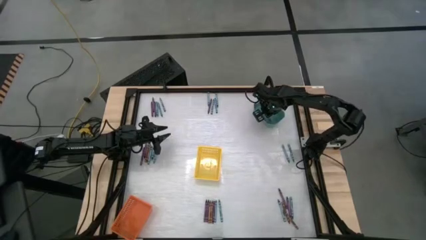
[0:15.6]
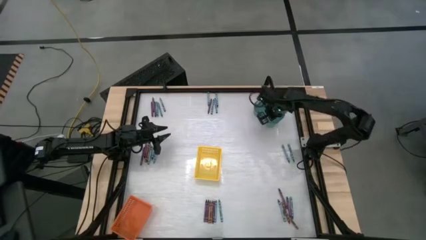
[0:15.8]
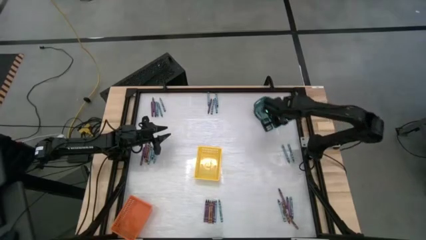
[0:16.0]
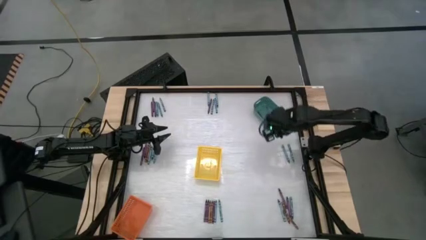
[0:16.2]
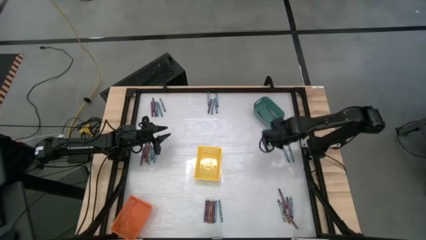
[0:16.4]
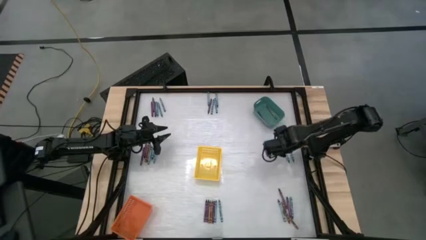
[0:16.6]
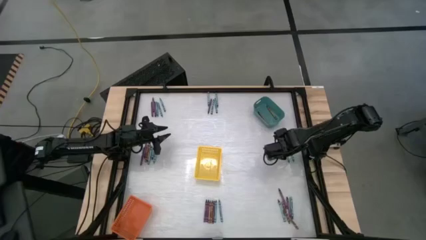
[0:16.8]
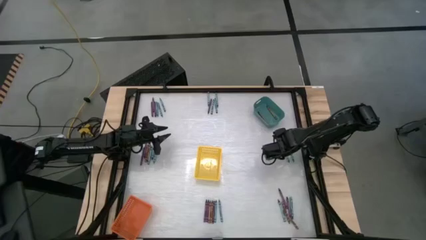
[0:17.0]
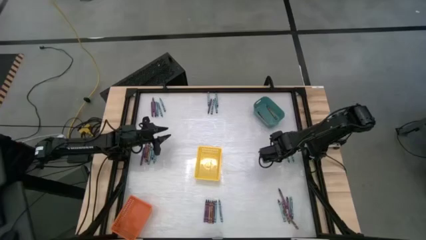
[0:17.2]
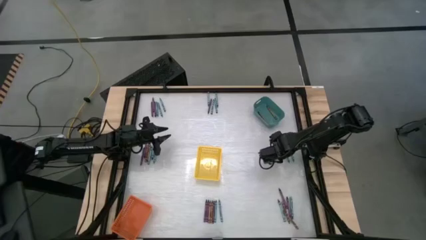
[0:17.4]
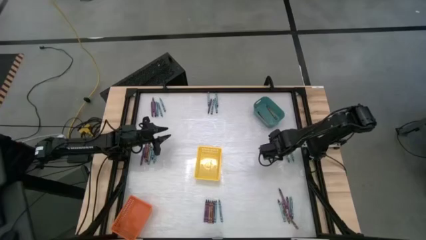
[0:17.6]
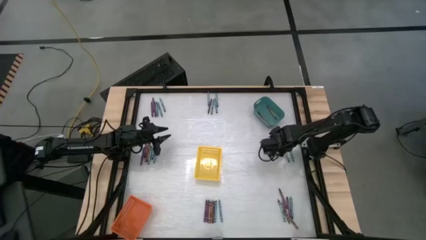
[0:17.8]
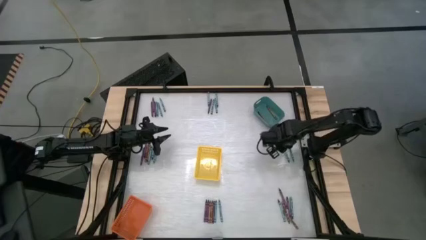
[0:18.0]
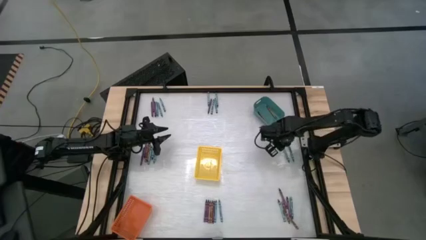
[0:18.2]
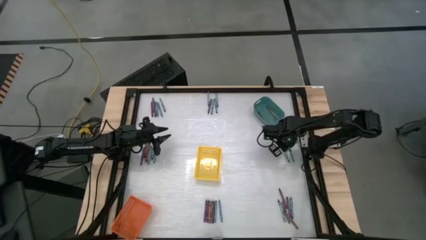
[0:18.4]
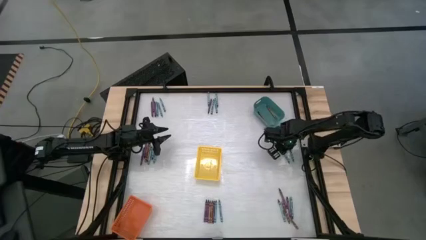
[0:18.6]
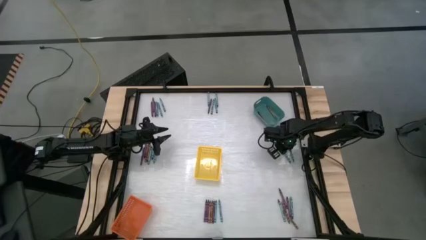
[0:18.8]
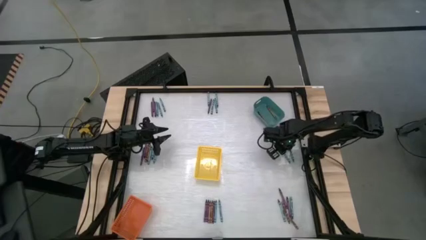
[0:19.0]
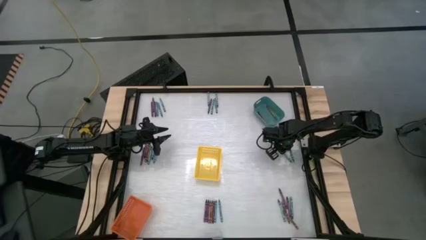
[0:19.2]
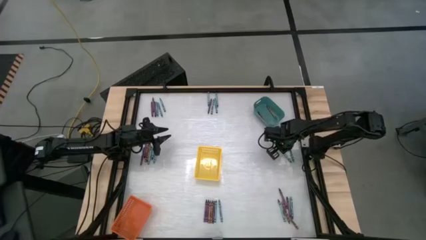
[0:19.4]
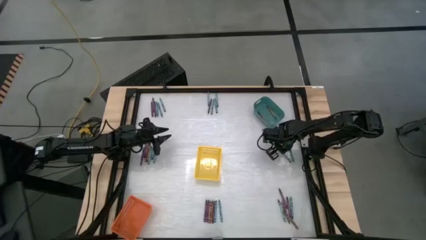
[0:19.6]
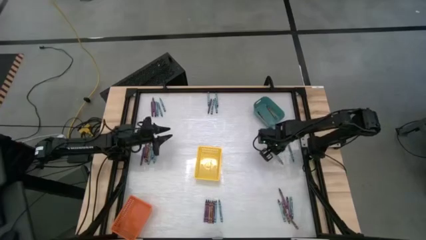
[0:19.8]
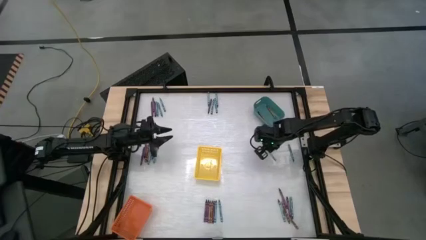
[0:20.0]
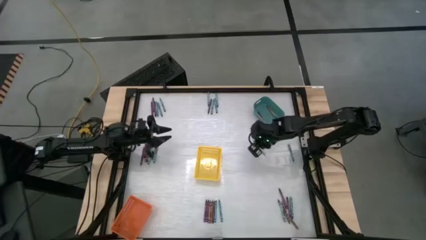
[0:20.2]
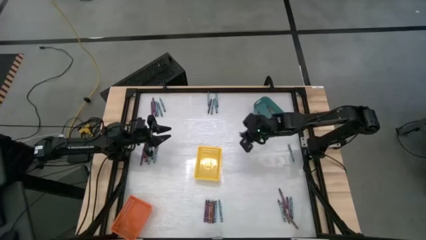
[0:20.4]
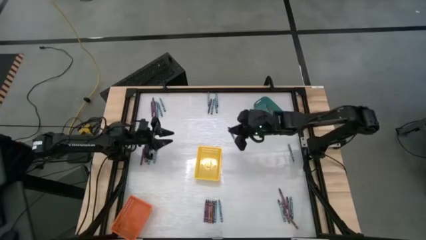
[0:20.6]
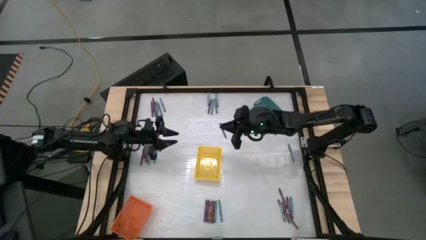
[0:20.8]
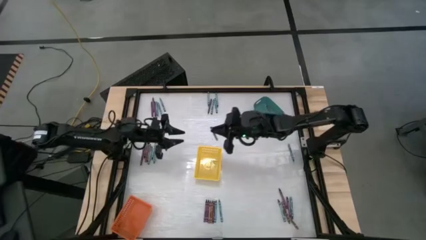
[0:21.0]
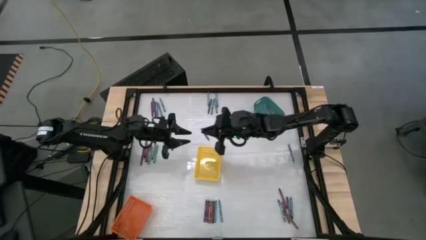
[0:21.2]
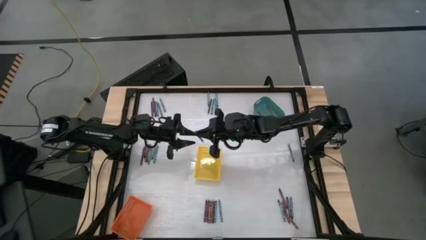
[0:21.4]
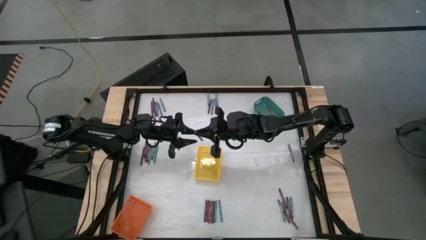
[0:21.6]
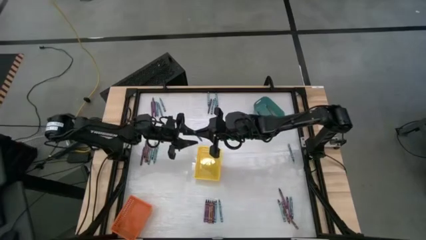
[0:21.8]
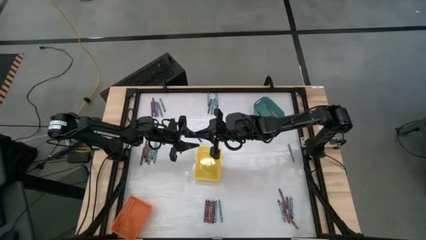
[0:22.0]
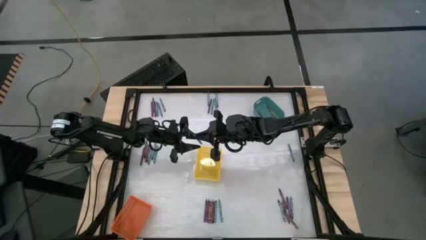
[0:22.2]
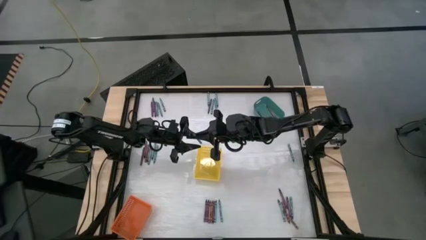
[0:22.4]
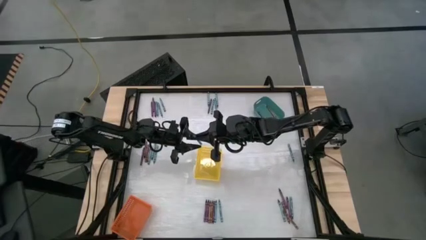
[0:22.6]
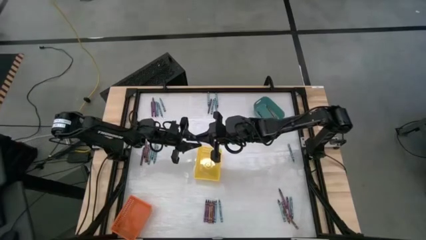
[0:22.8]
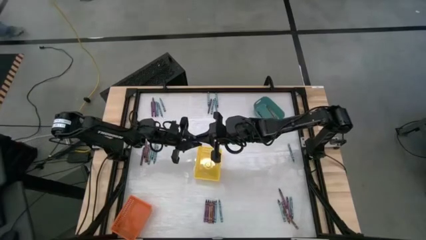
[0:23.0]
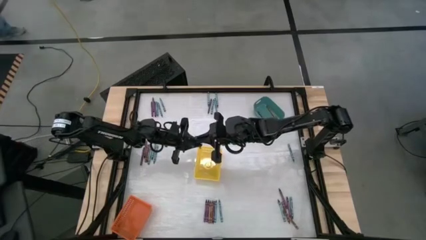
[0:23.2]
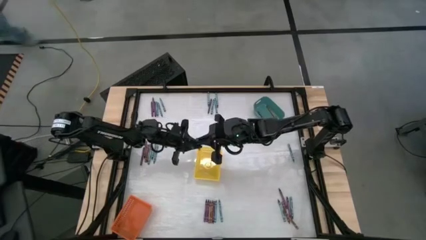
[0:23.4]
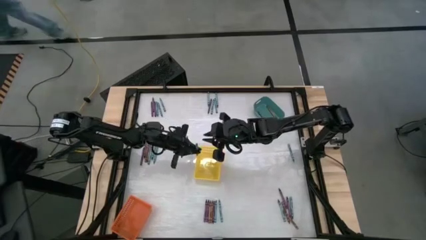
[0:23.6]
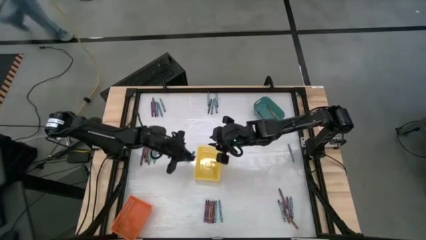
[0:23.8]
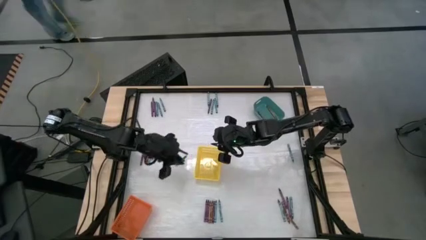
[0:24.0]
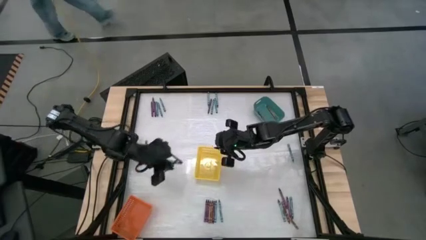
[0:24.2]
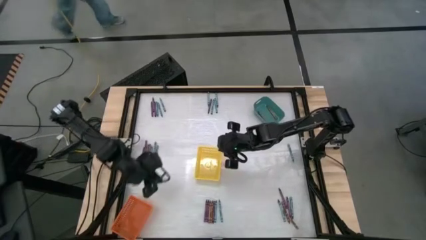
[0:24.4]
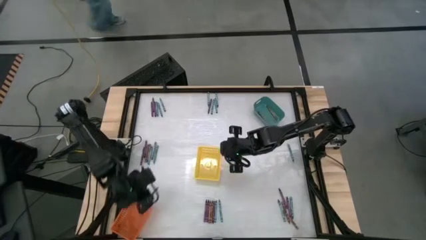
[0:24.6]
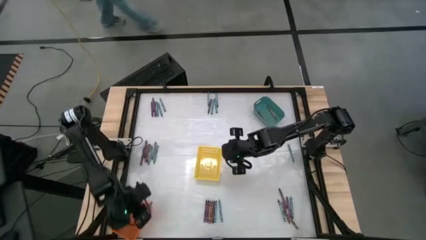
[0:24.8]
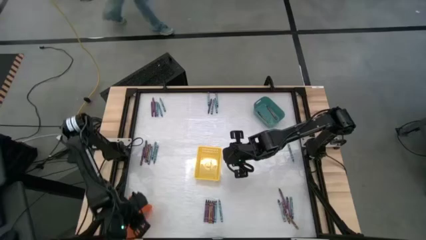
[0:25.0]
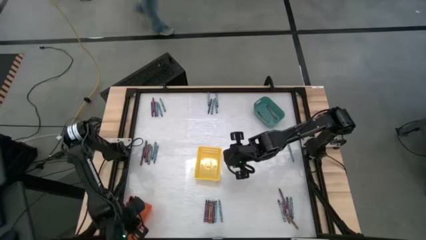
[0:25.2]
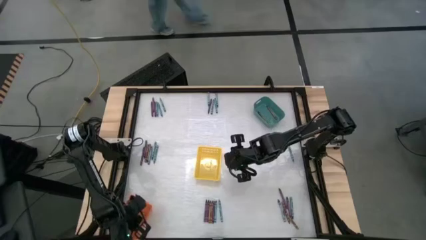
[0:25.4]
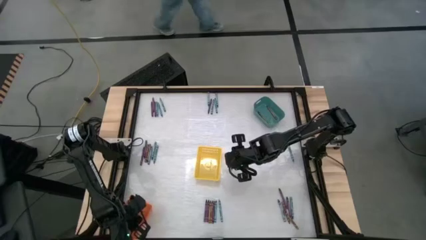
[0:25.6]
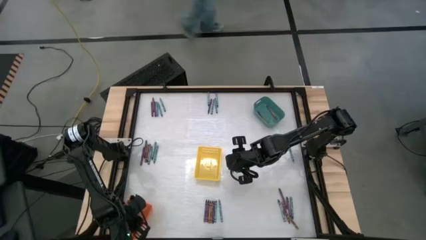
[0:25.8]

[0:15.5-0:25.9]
Task: Sort crayons
Put the light blue crayon into the orange basket

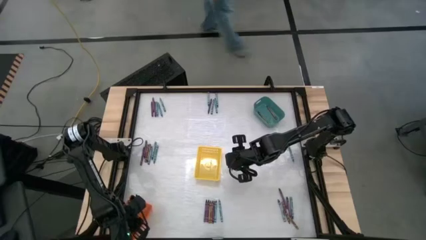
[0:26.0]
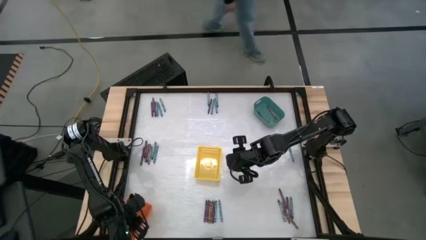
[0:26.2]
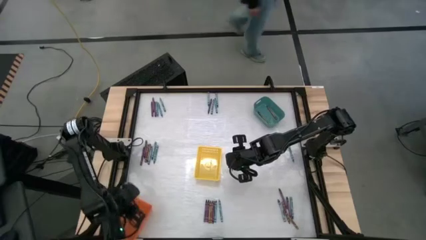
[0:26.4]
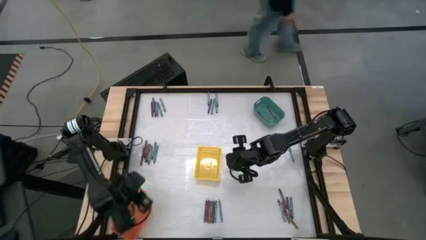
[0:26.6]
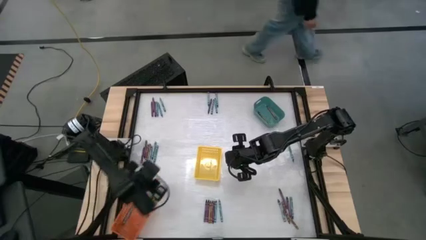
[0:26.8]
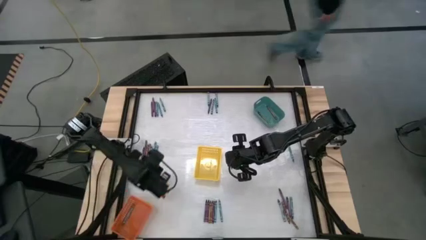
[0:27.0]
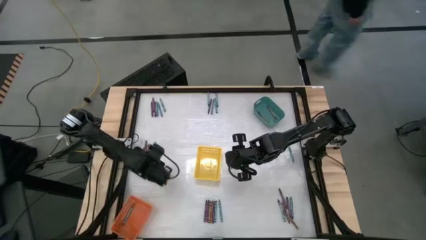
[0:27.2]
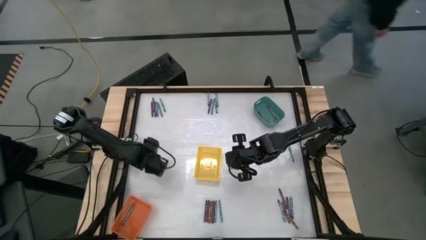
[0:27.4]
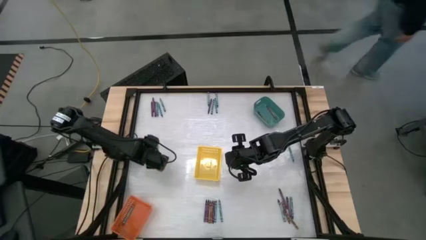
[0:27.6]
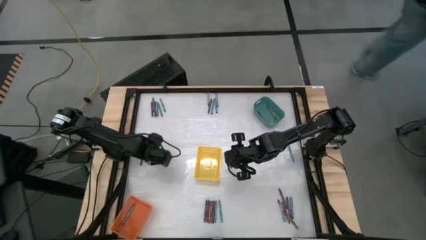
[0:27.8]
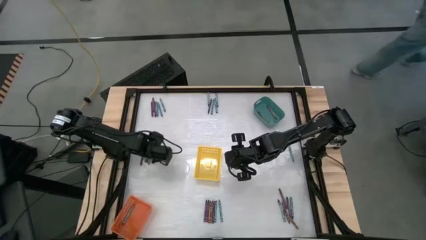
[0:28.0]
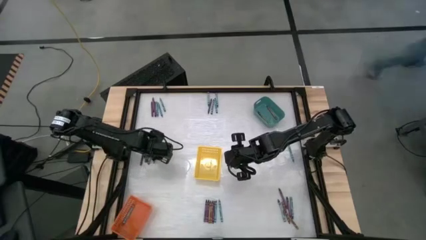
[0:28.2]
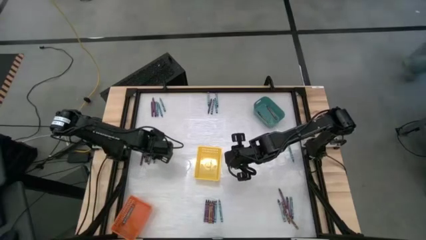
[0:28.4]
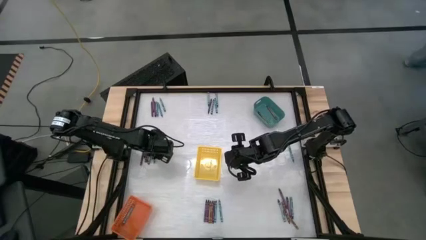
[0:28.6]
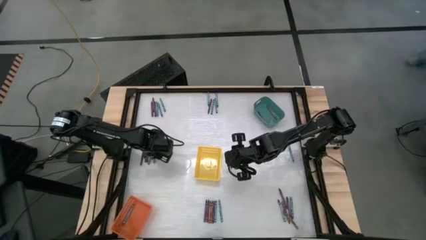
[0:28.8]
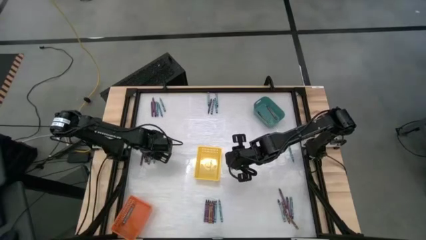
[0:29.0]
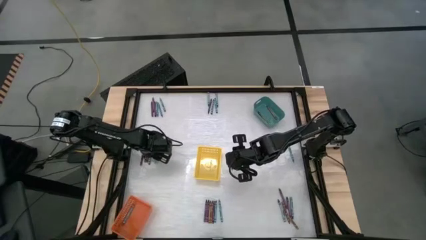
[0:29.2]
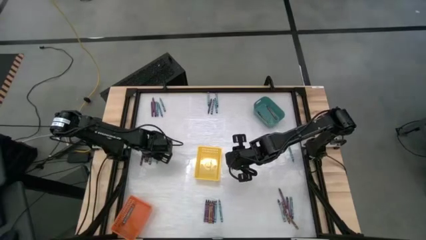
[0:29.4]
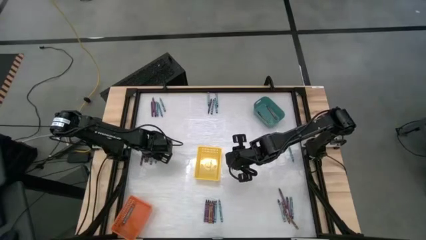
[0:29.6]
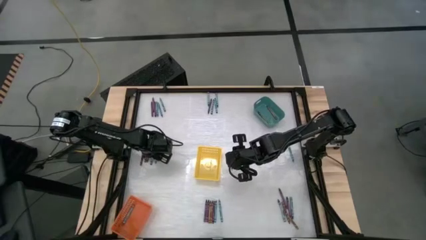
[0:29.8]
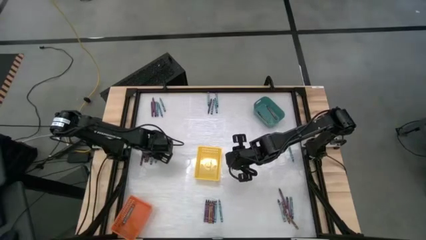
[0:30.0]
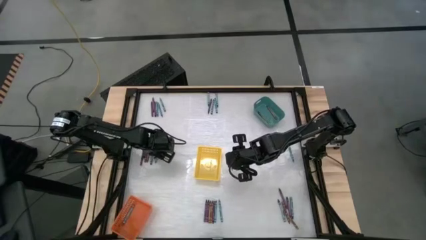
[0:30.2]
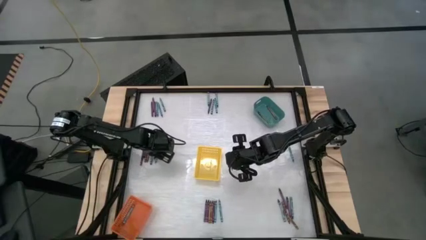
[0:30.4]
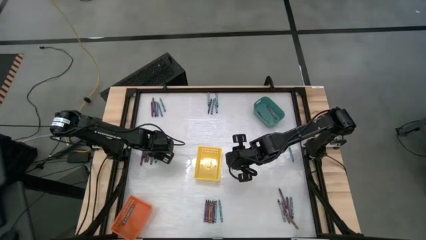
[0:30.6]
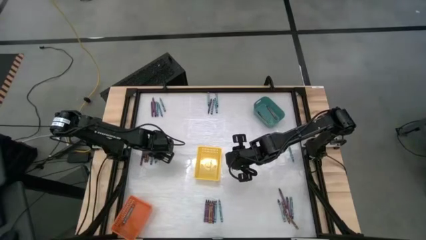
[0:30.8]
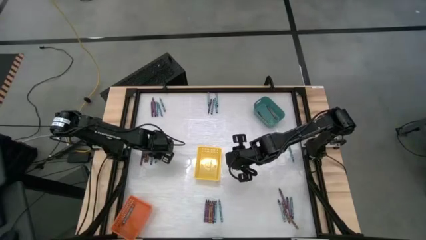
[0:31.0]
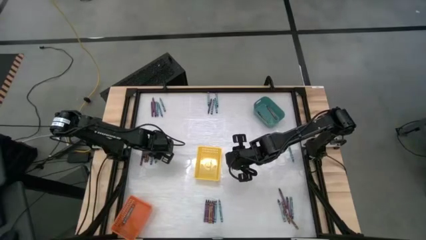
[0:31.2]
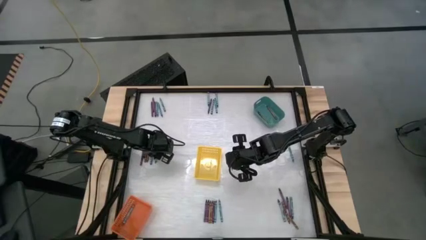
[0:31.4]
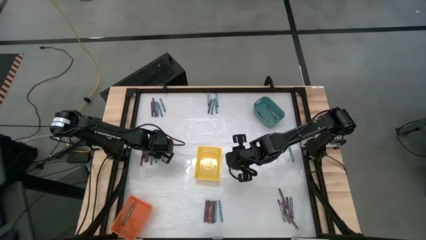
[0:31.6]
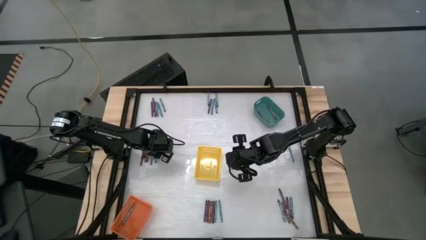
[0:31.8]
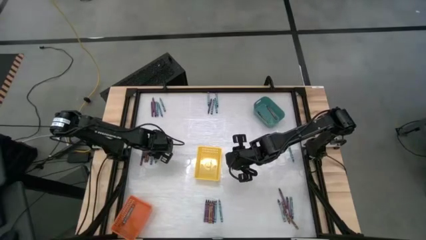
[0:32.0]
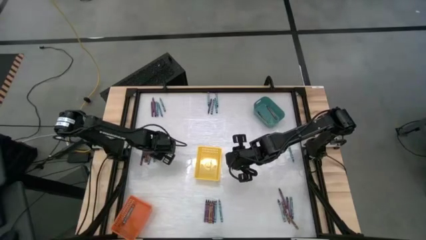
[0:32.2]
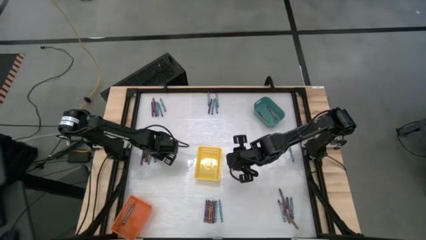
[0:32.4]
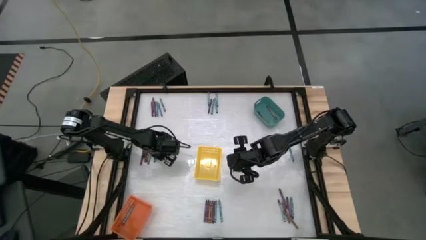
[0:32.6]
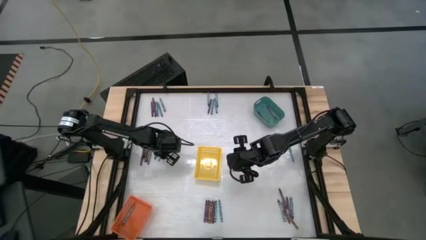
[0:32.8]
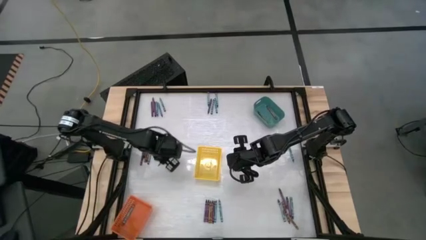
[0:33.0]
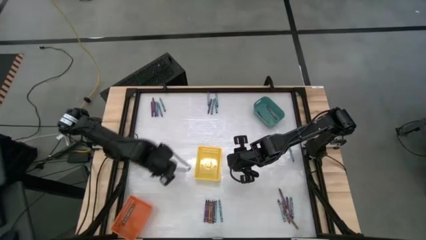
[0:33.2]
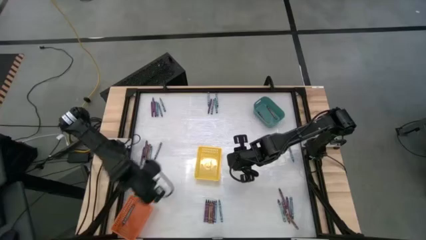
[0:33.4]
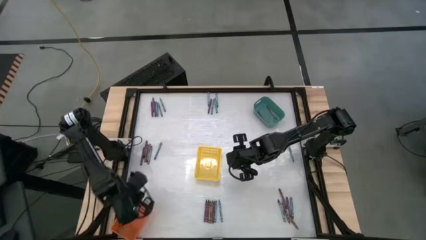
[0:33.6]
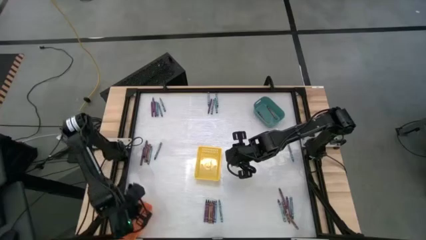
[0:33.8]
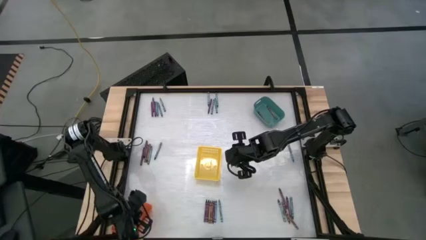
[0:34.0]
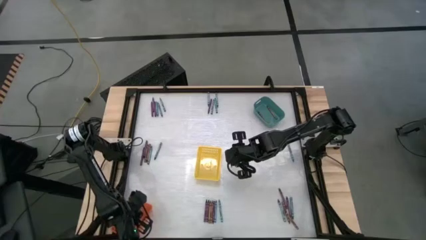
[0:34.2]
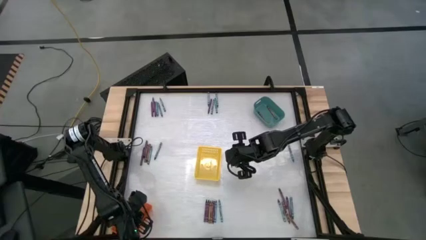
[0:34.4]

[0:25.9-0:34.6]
Put the light blue crayon into the orange basket
